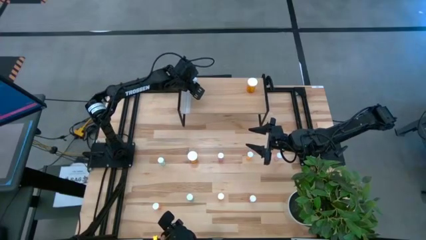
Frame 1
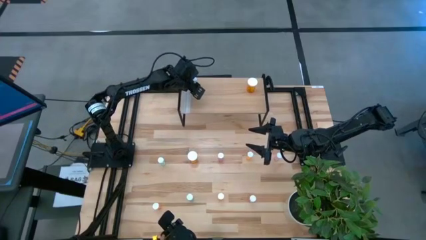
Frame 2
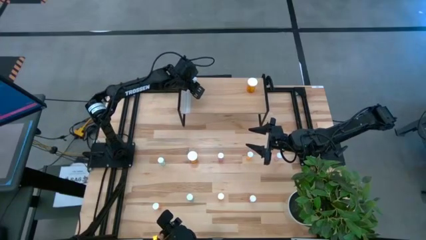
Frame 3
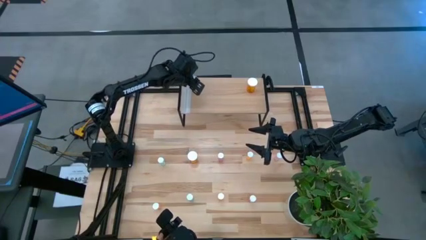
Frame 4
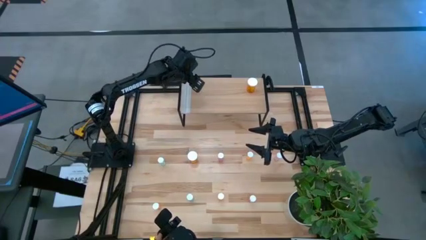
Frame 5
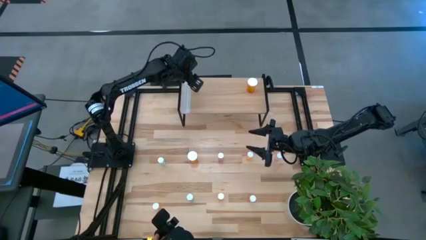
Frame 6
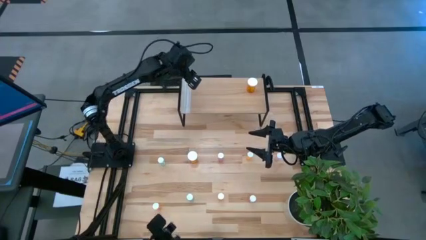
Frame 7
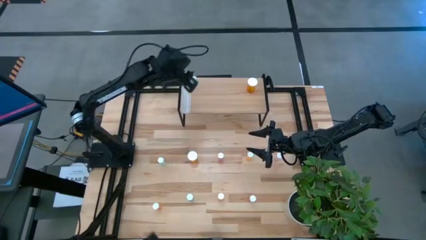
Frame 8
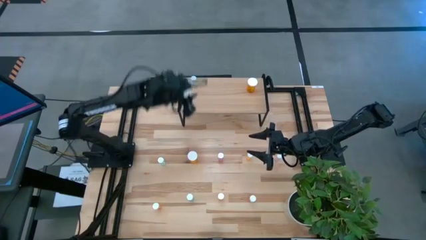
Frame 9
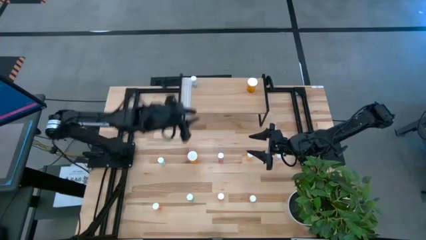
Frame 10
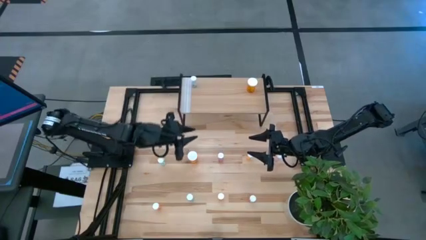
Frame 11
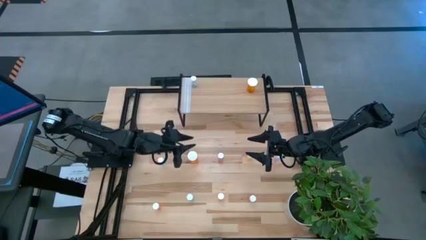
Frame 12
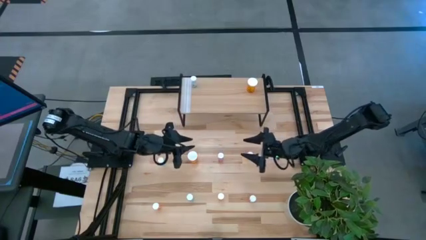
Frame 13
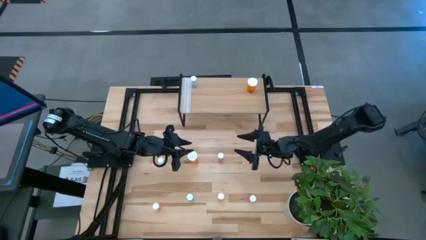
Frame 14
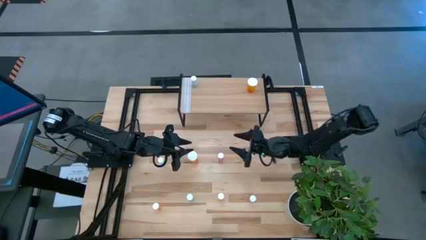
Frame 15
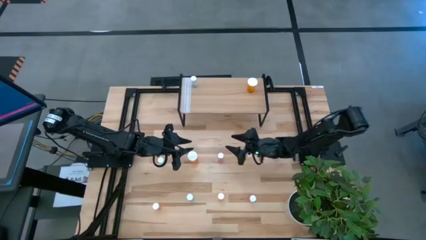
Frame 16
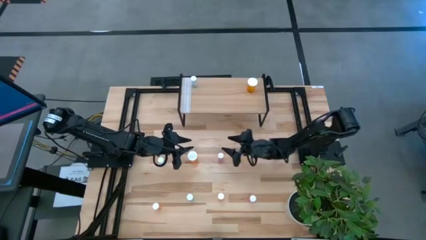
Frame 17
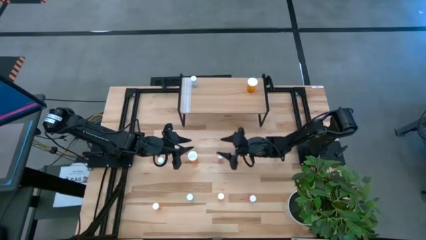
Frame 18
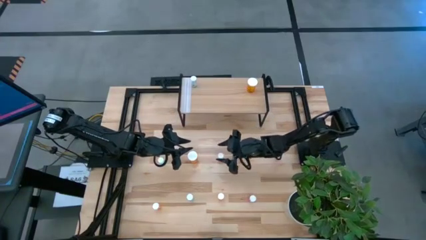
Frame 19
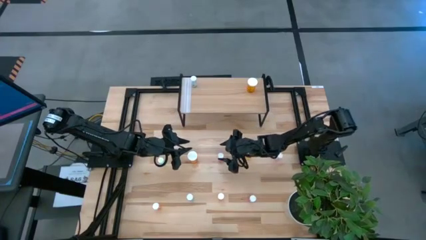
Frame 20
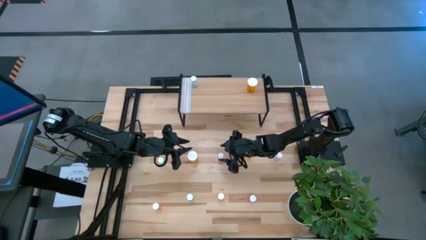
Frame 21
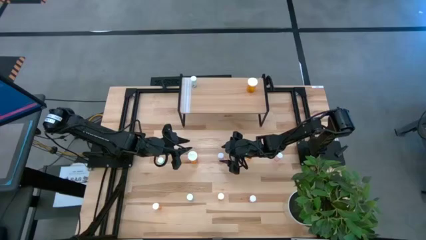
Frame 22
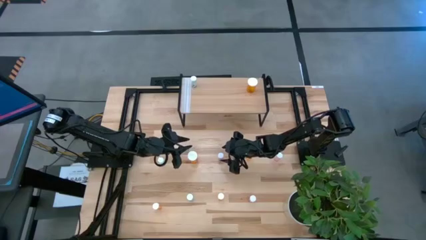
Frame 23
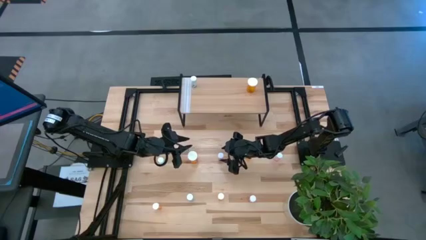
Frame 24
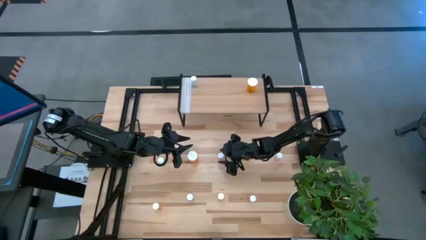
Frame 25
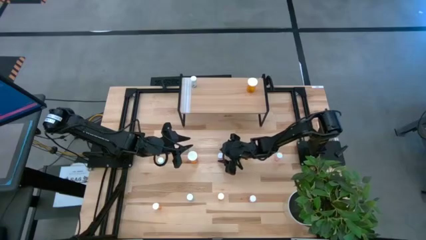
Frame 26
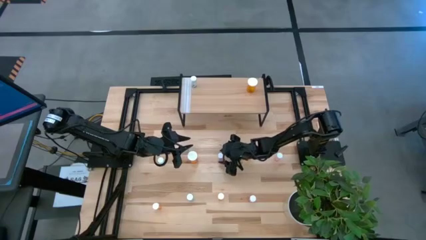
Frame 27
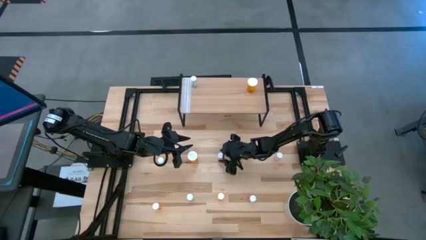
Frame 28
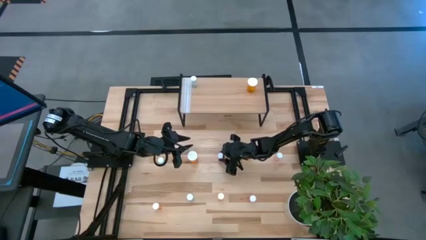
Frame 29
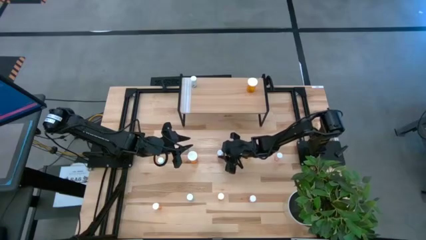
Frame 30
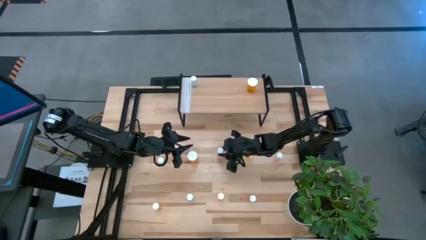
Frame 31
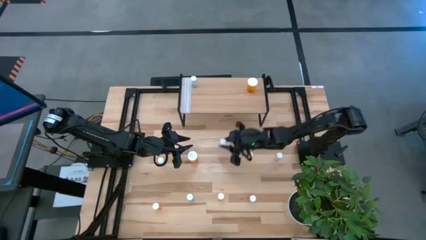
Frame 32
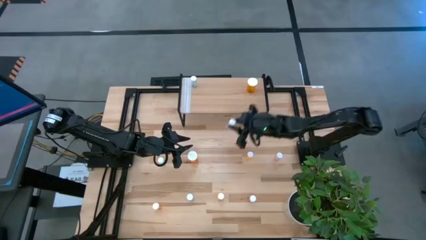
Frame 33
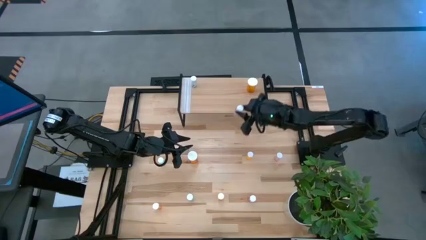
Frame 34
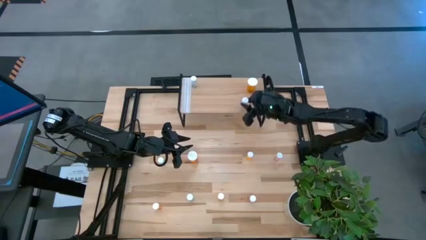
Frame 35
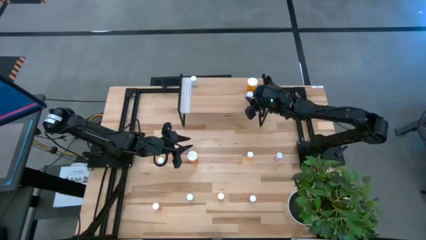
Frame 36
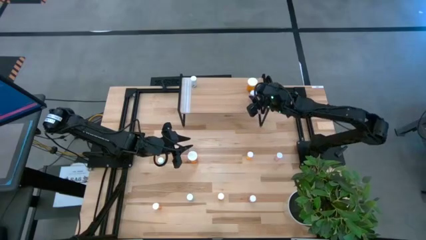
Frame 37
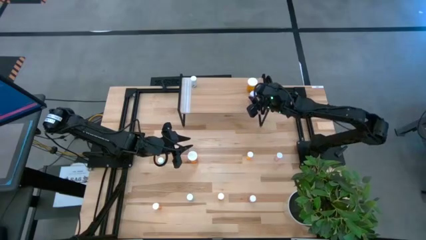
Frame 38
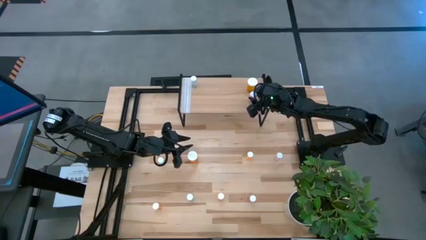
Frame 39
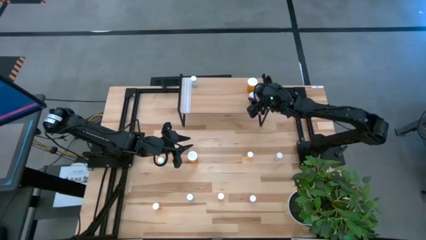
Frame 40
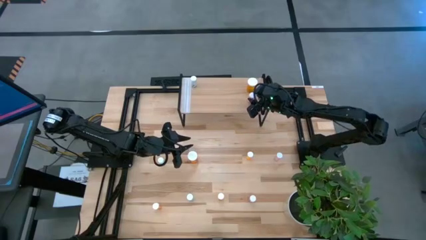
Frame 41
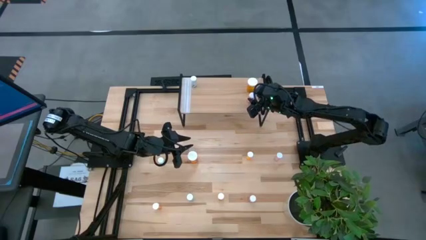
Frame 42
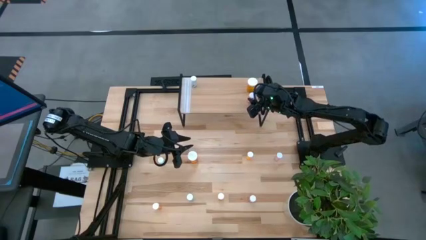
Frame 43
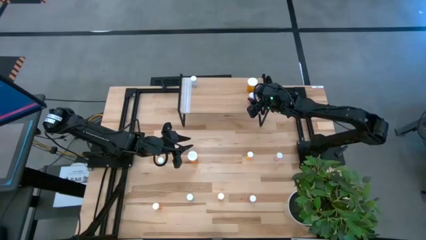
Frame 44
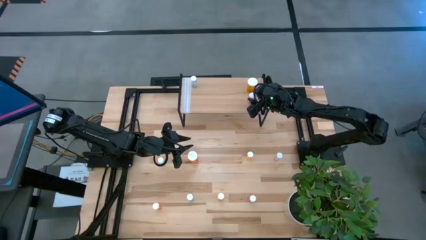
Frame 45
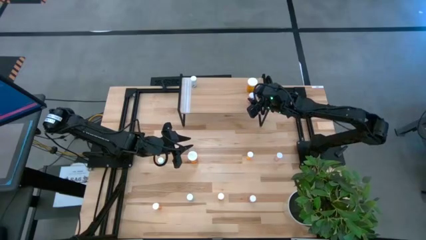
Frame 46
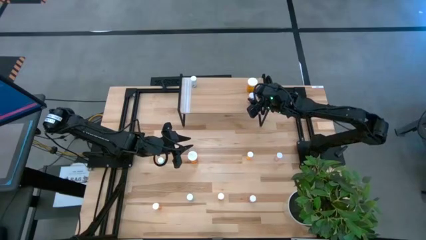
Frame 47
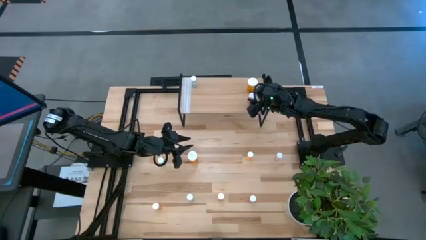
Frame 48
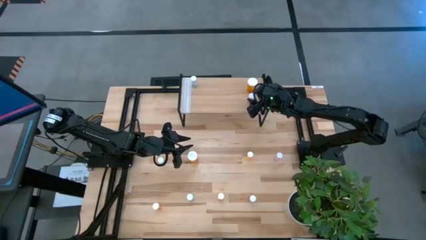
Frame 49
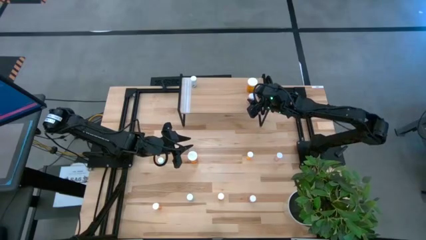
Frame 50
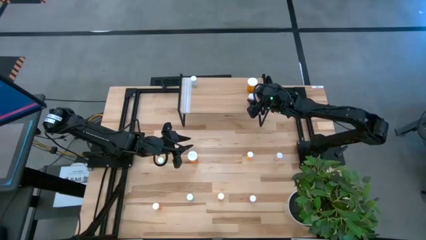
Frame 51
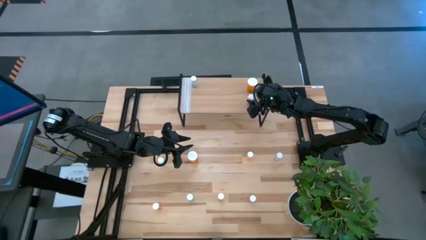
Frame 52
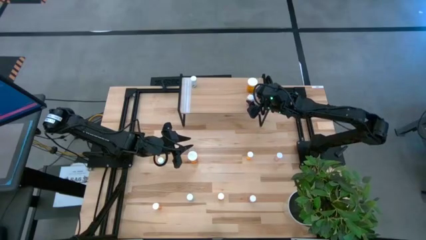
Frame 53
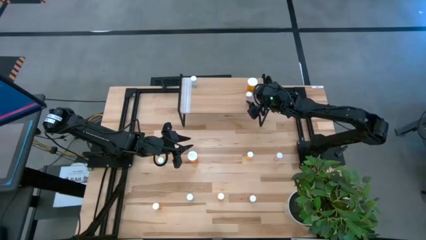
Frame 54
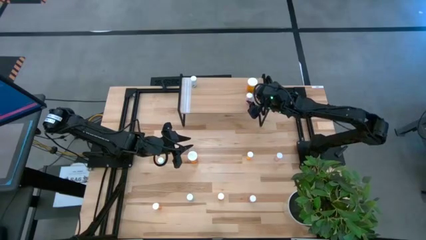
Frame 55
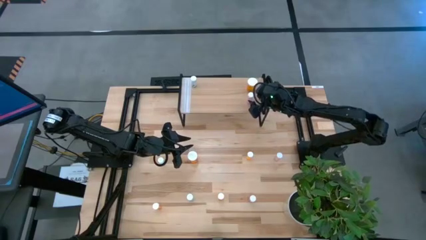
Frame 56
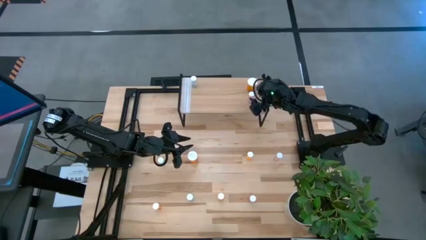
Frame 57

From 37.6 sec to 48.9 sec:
Task: Pick and place medicine bottles onto shelf by color
Put the middle pink pill bottle on the shelf
